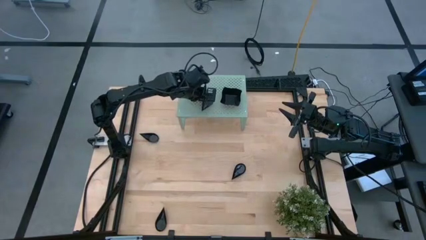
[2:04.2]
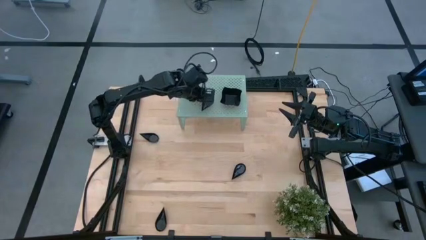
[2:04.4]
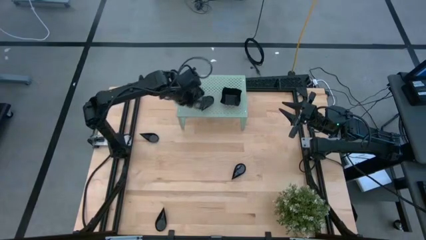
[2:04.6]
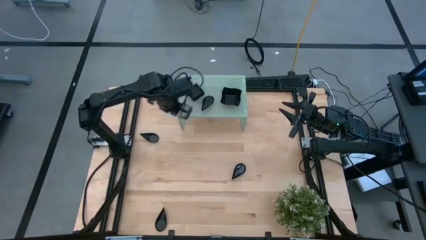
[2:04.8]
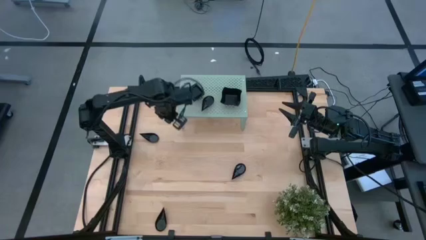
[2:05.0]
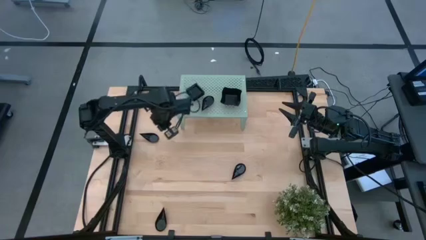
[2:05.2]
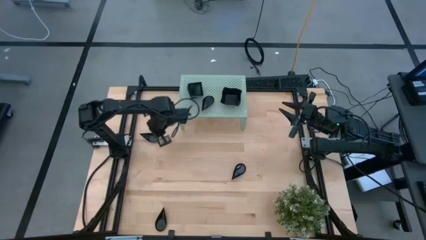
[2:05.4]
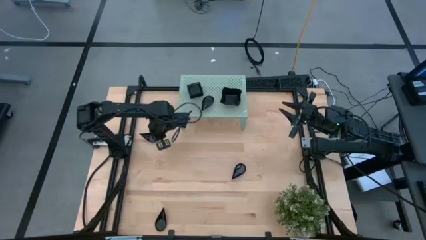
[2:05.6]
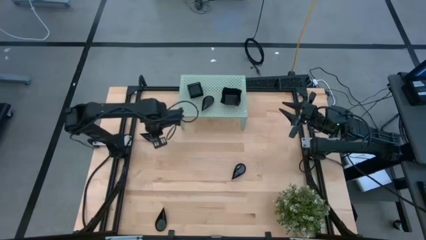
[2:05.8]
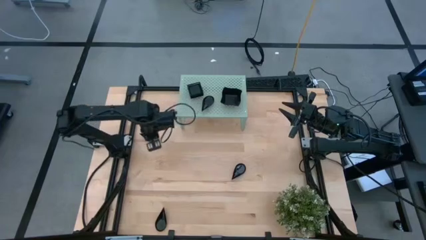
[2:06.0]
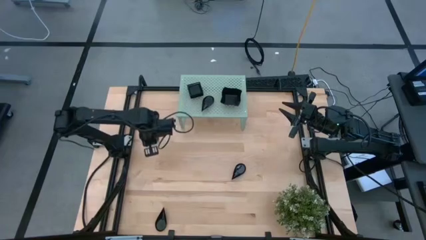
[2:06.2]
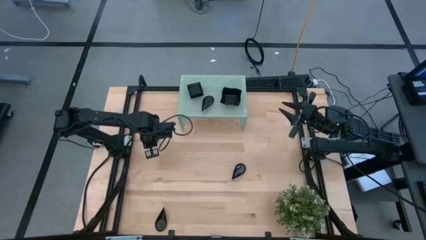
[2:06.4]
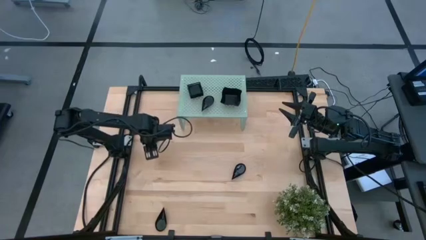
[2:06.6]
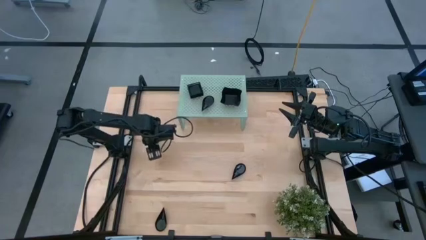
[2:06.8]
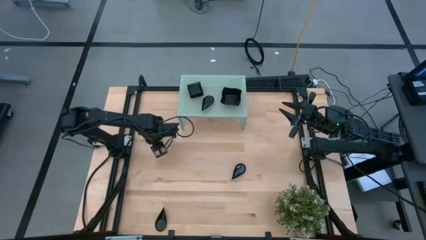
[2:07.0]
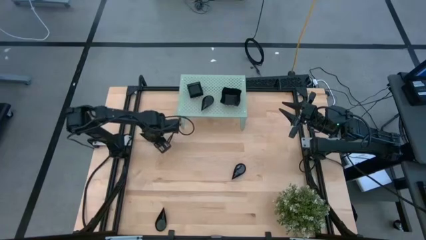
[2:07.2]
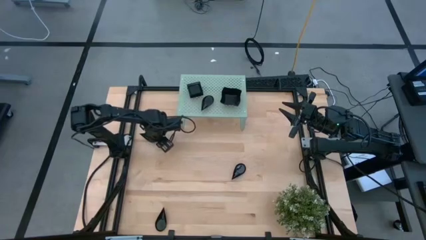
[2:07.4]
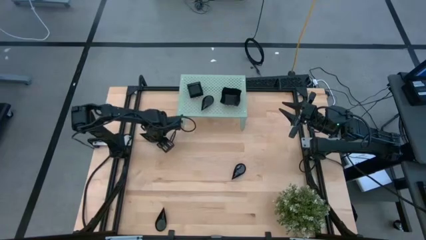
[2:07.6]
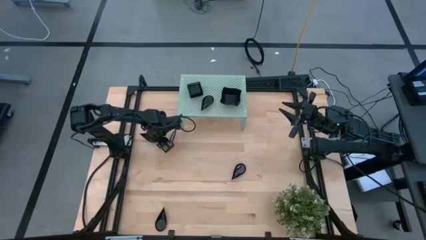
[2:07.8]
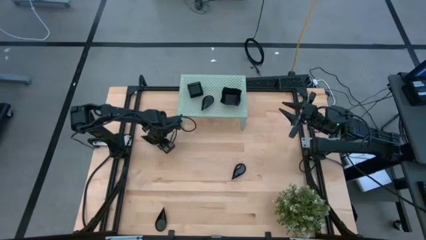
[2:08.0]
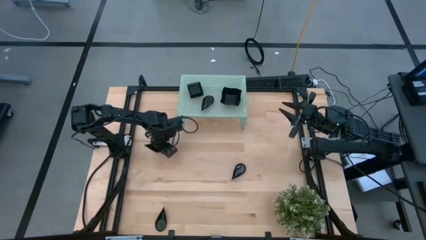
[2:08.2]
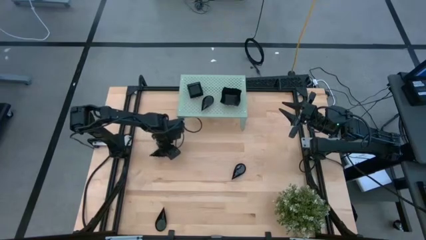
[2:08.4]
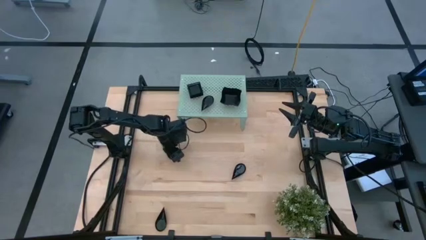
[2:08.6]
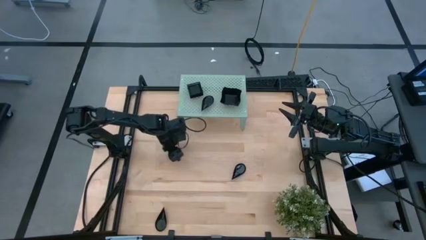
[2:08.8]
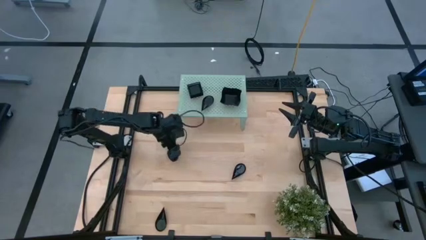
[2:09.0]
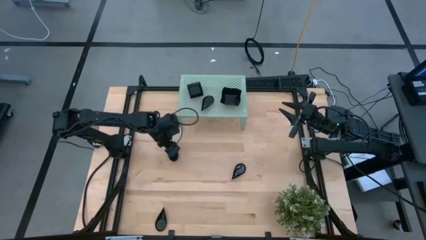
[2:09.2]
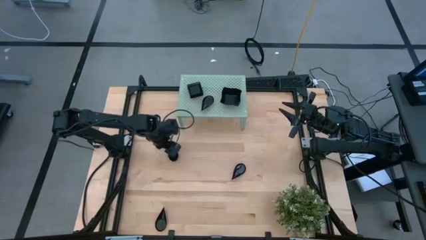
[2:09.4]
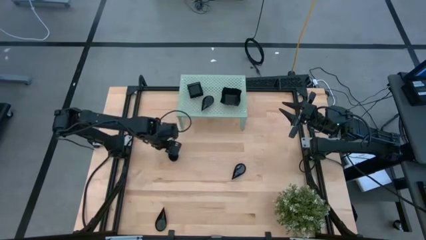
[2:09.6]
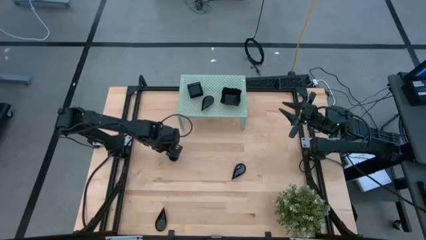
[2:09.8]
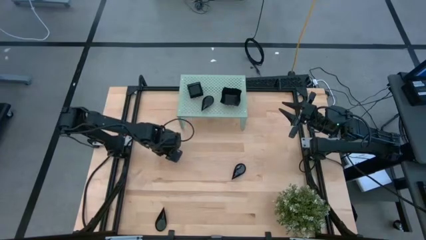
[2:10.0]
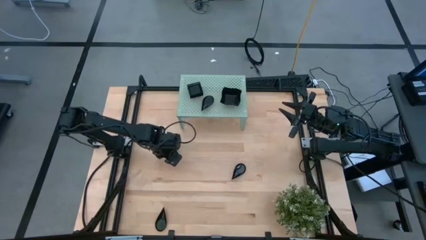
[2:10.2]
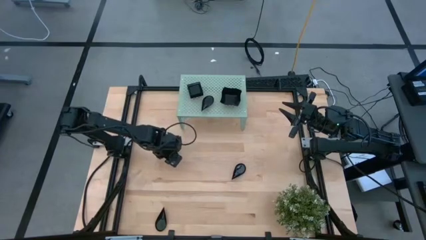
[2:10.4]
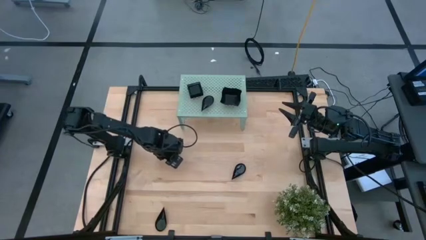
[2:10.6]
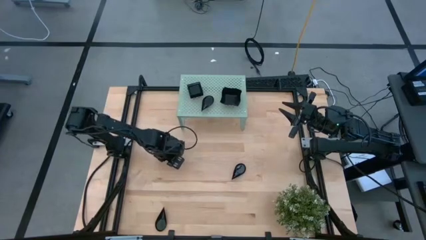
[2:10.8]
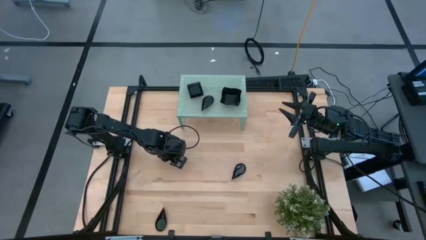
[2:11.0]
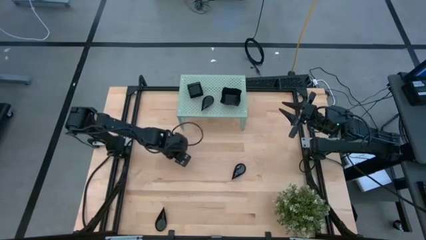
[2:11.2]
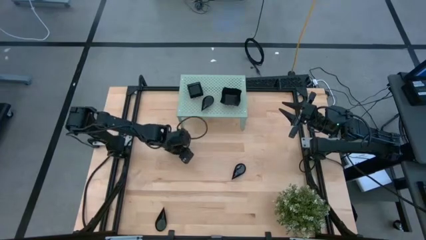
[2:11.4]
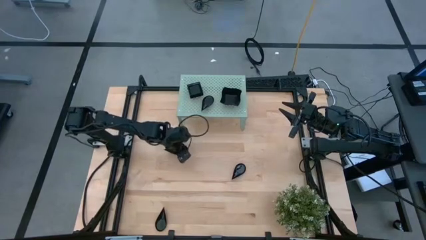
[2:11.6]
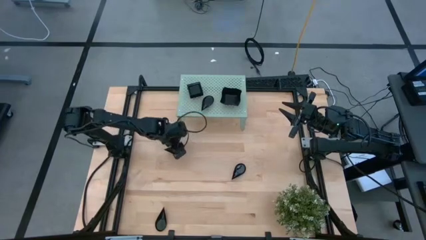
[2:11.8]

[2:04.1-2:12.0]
Task: Pick & Place Mini shaped plates
Move the black drop shaped plate near the shelf

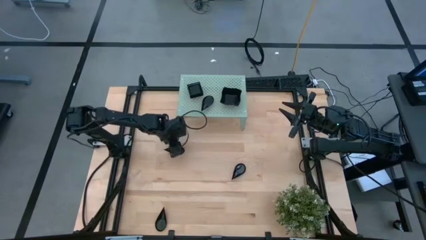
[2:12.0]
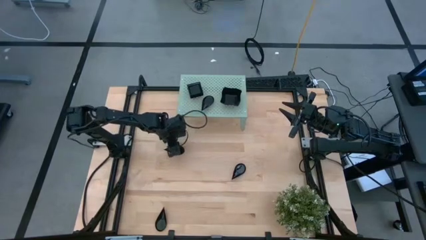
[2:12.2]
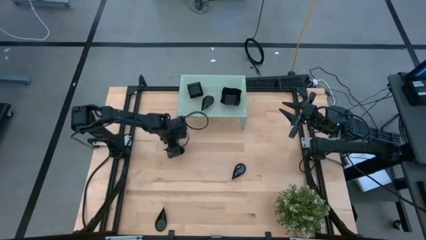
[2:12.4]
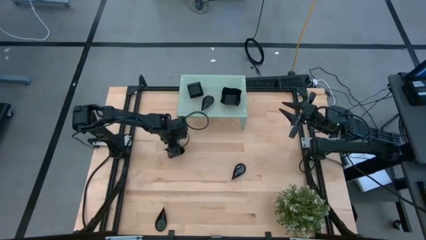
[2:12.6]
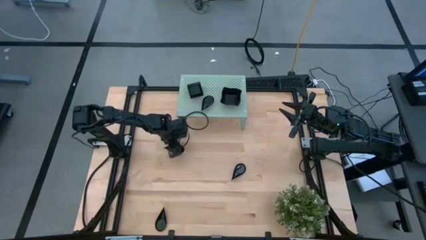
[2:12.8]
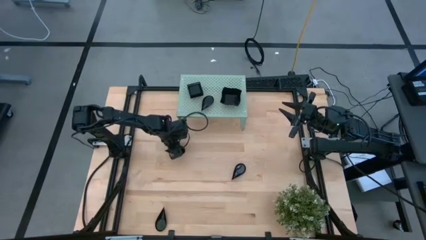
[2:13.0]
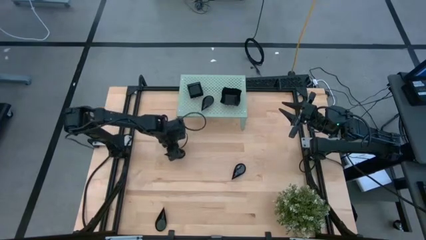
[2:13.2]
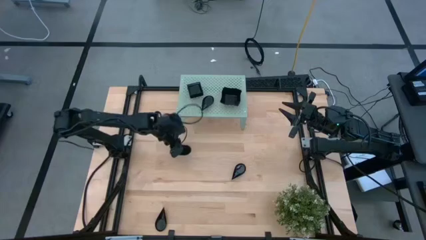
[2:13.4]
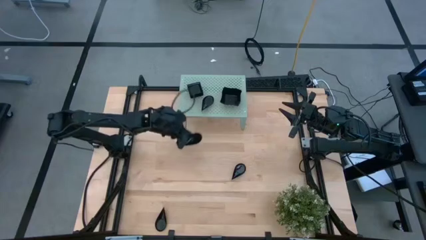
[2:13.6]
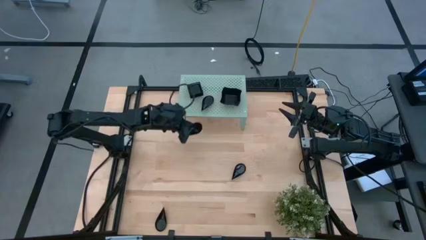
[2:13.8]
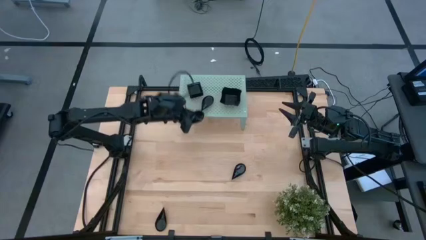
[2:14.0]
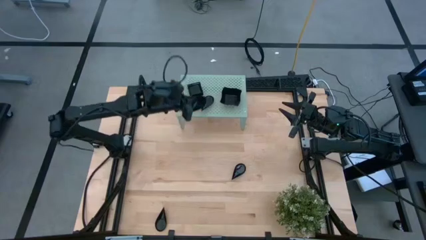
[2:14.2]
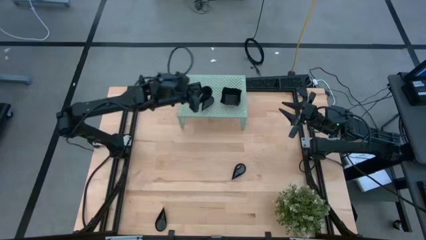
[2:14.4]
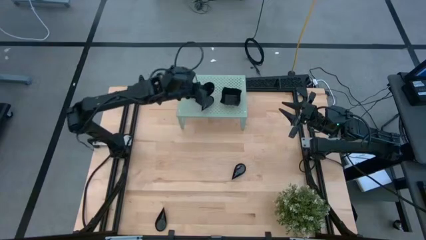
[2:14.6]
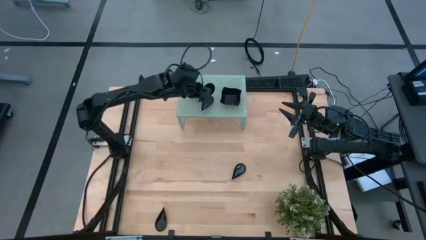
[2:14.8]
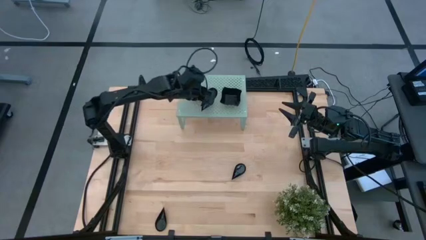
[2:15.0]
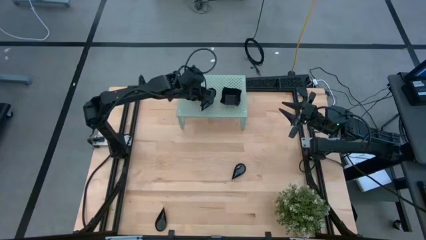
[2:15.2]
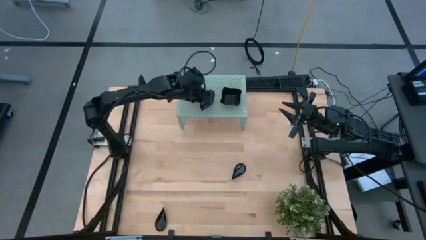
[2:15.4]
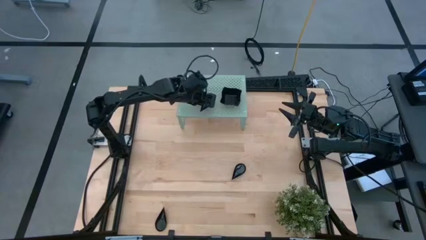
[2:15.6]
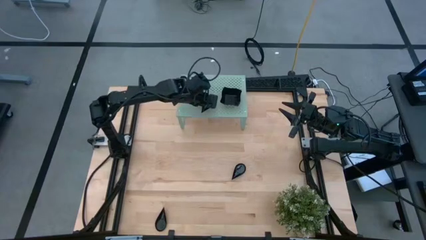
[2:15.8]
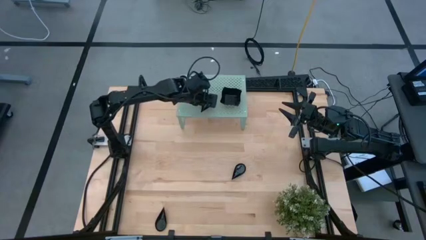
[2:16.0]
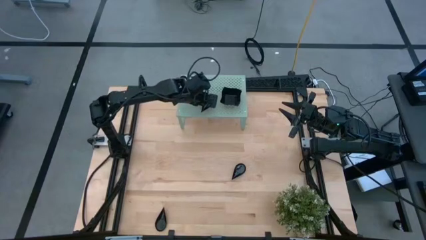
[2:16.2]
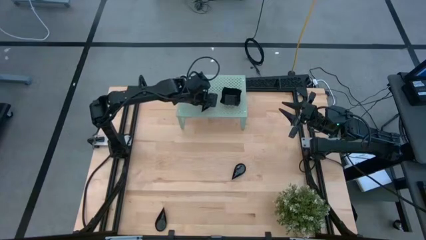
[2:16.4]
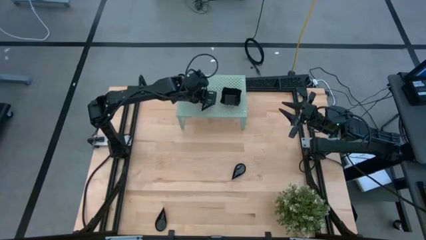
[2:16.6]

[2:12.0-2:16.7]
Stack the black drop shaped plate on top of the other black drop shaped plate on the shelf
